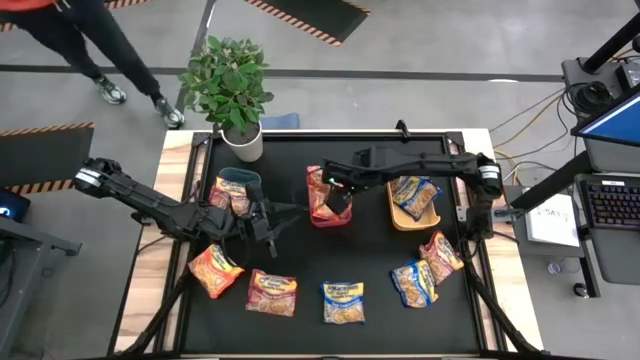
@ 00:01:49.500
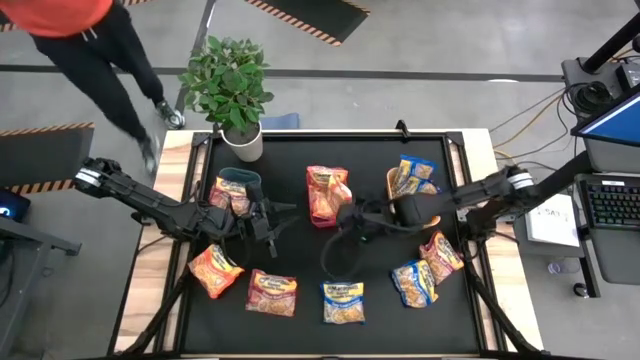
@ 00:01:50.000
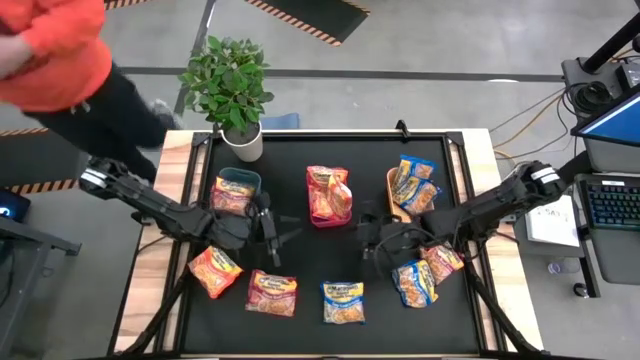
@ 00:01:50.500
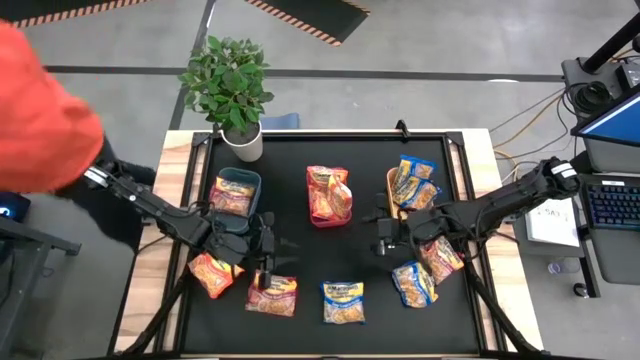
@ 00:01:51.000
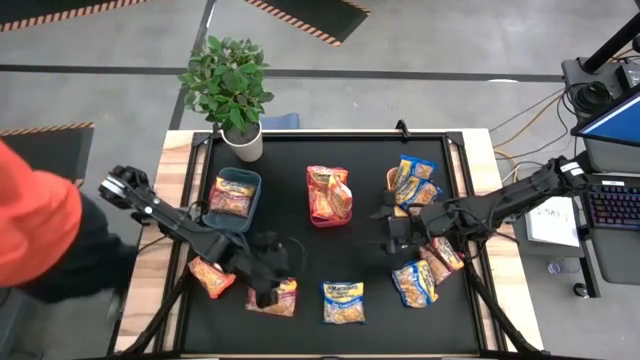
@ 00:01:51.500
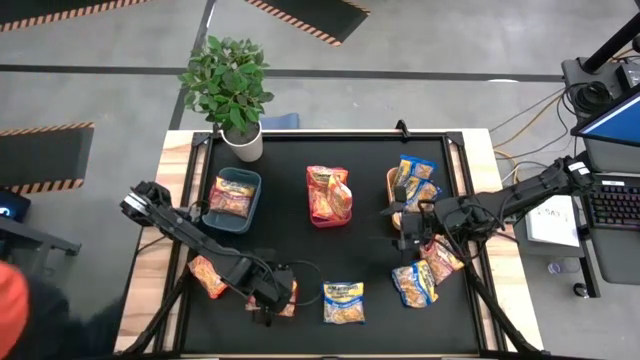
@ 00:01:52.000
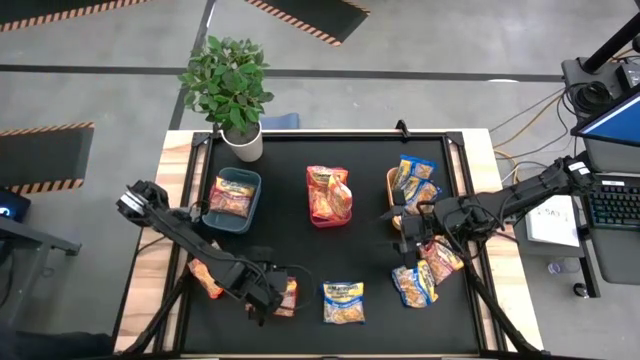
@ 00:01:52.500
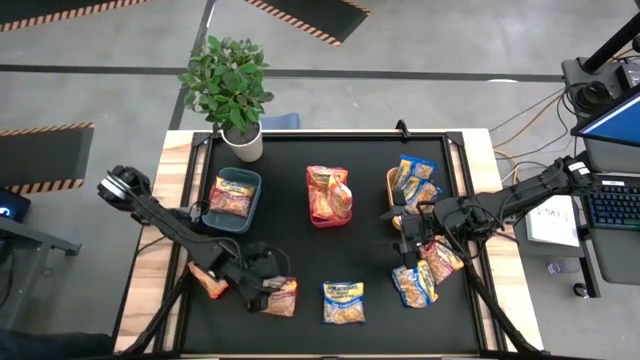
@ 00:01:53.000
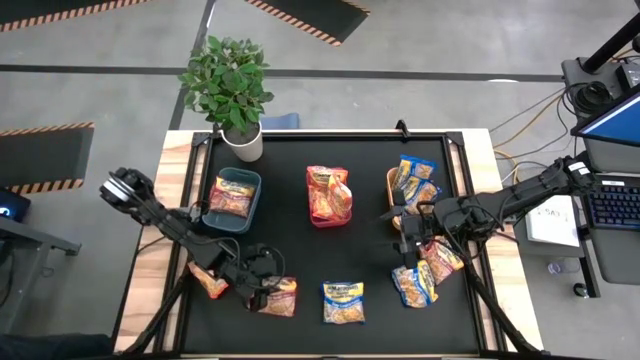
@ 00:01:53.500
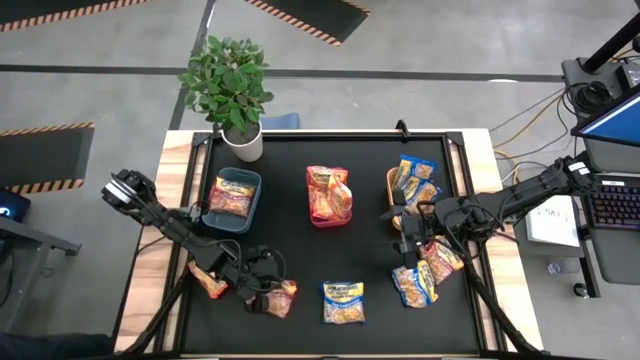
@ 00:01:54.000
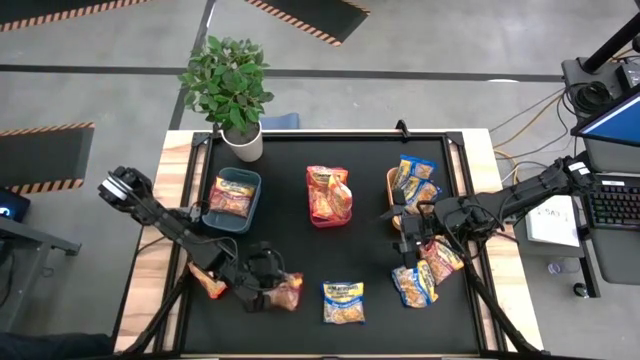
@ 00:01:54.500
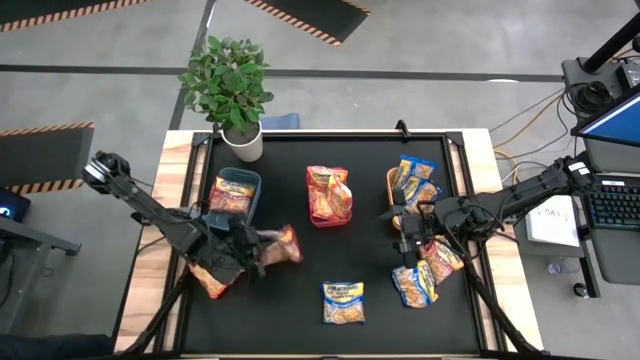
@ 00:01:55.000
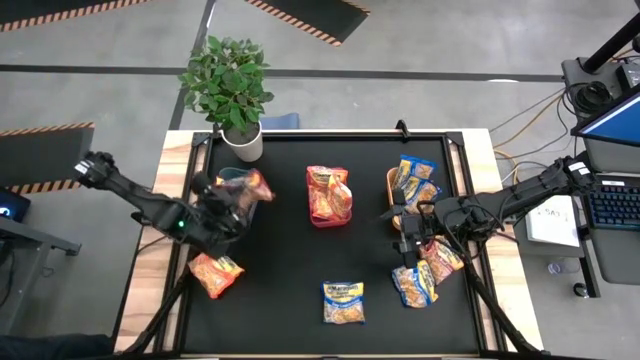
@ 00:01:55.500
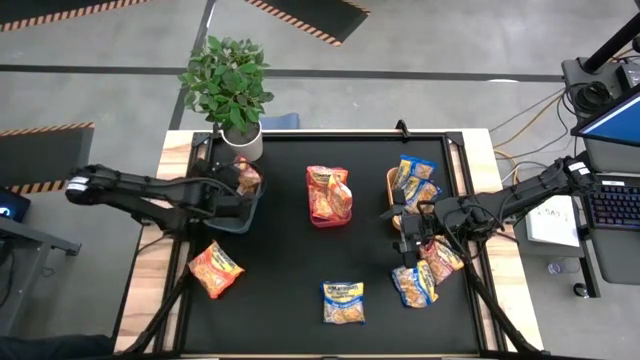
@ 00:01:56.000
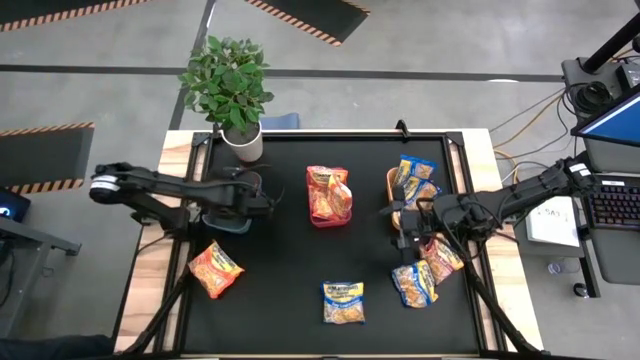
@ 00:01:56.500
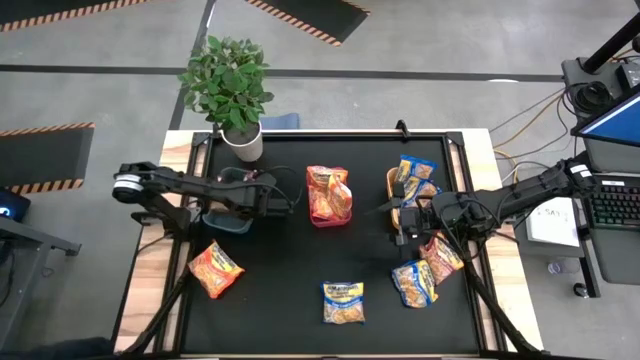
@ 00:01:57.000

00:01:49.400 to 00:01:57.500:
Task: Sort Maruchan noodles
Put the red noodle pack into the blue bin

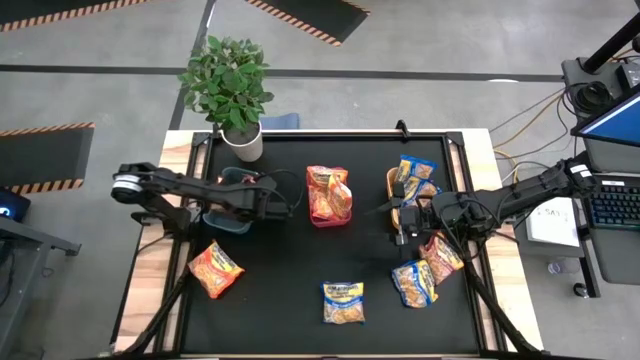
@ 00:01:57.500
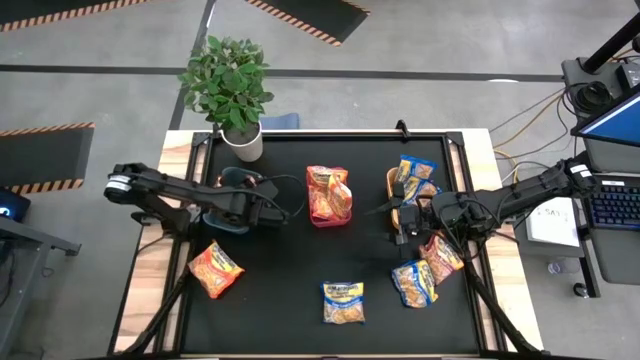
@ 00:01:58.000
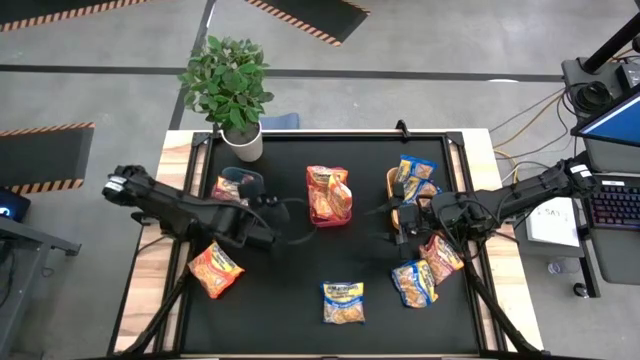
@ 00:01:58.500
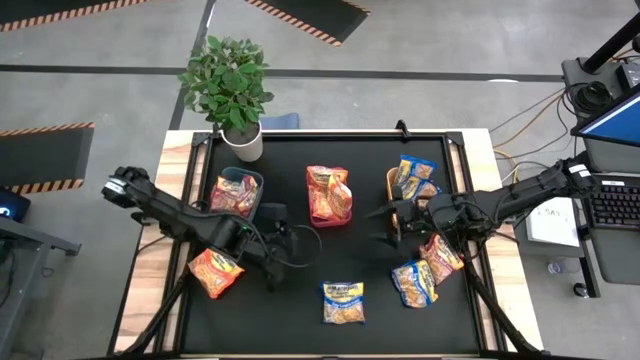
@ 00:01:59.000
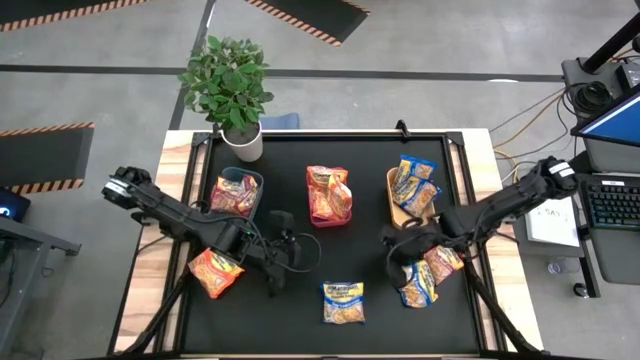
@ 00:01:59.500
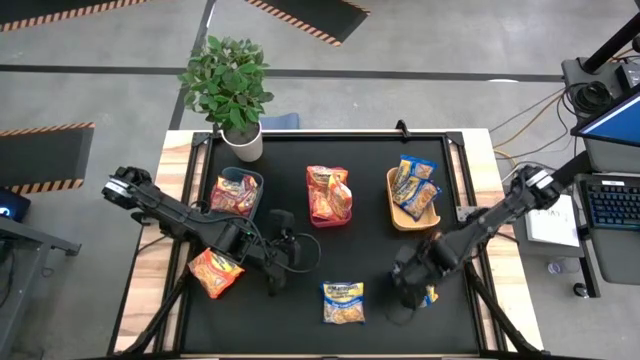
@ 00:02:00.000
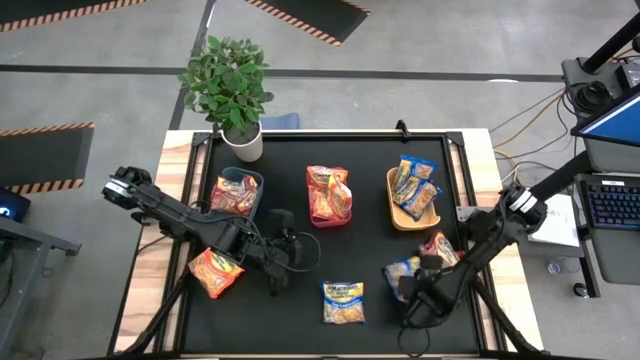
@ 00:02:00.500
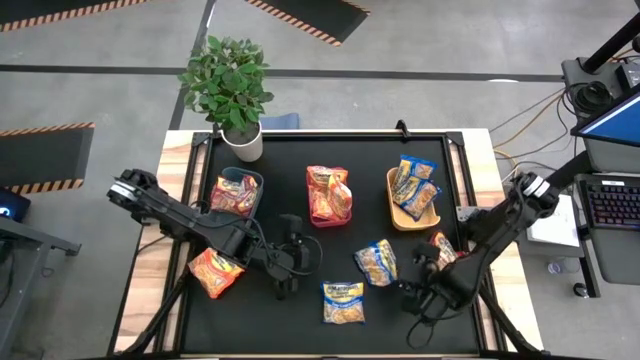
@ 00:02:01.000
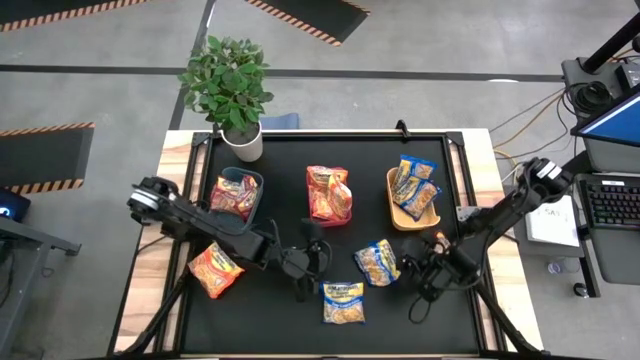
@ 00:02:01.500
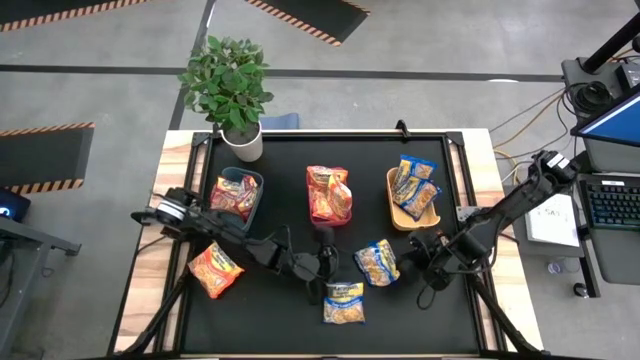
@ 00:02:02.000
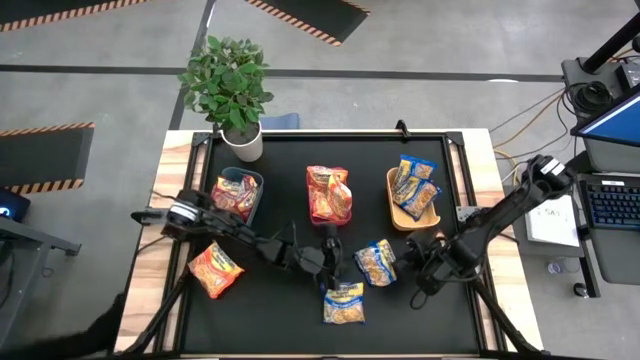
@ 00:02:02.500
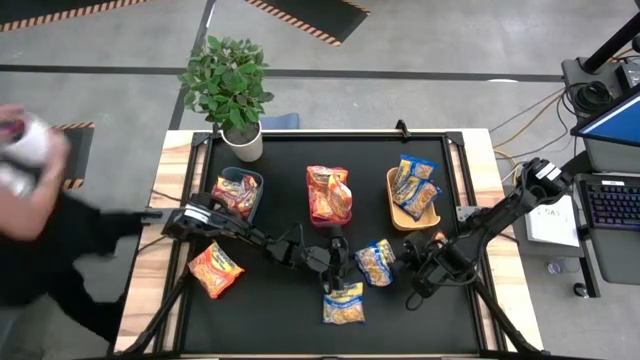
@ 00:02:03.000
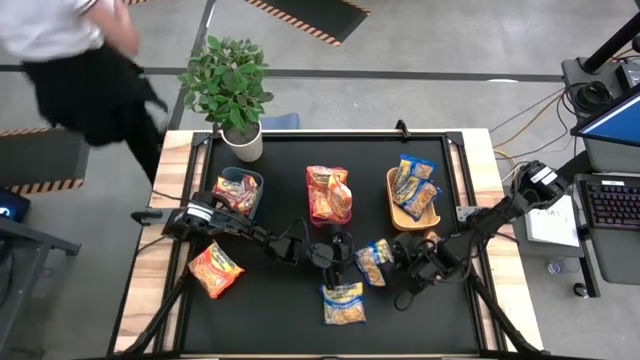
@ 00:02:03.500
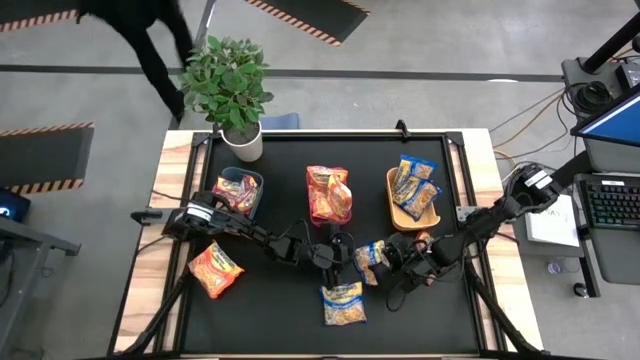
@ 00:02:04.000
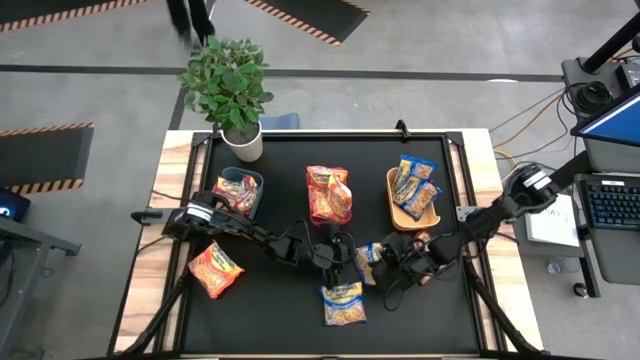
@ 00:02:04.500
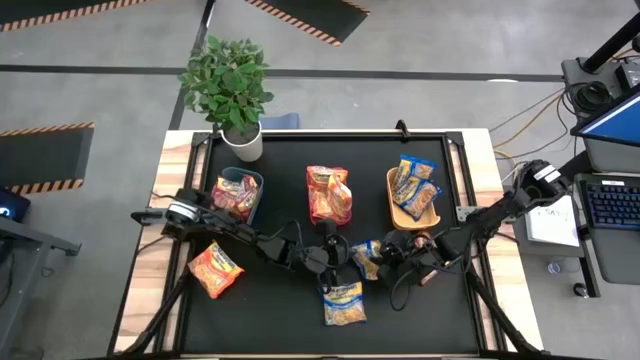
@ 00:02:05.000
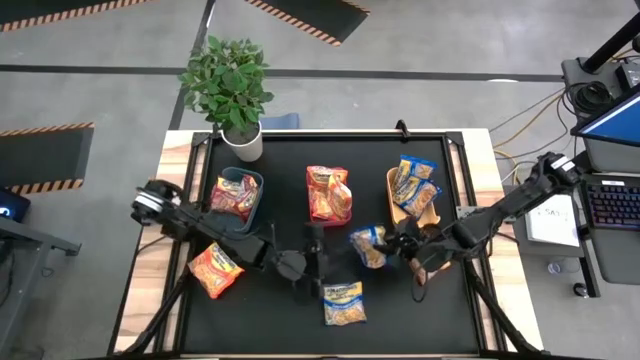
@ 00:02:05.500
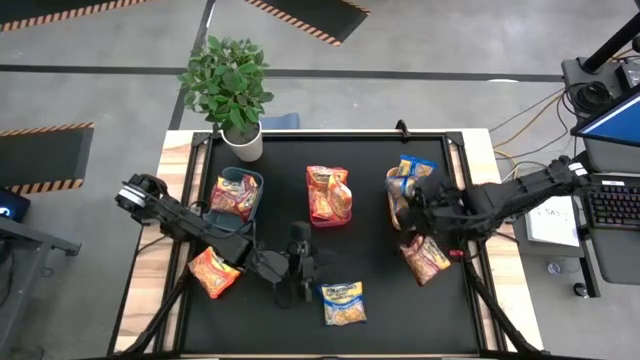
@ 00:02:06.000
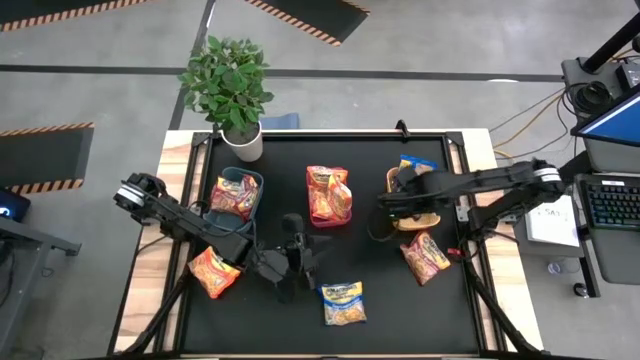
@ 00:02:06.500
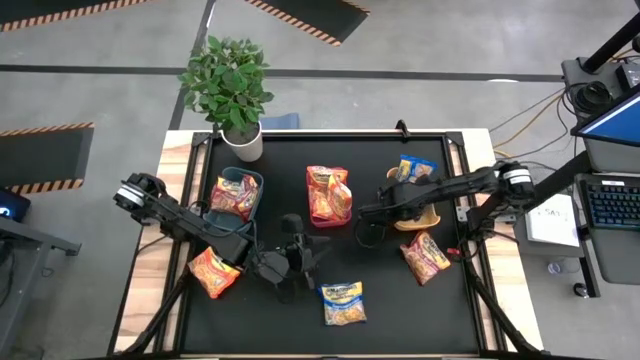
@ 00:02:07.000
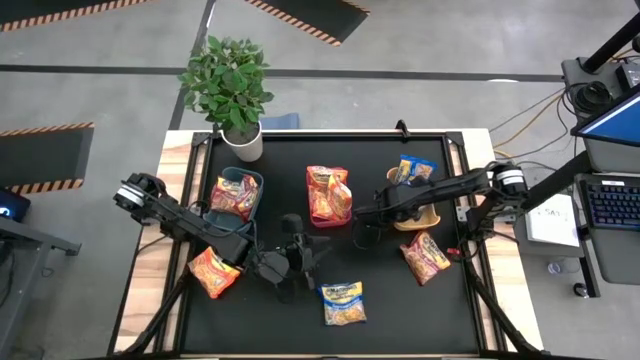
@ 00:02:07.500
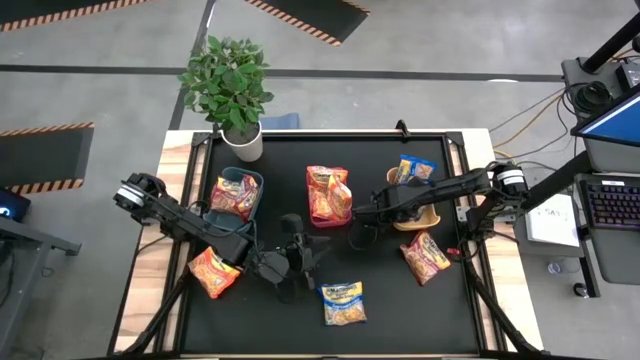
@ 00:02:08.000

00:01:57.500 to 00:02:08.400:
Put the blue noodle pack into the yellow bin

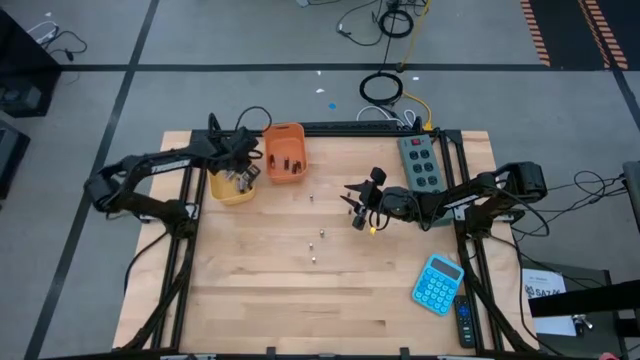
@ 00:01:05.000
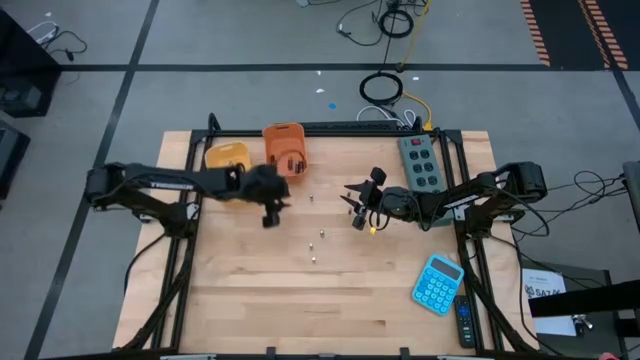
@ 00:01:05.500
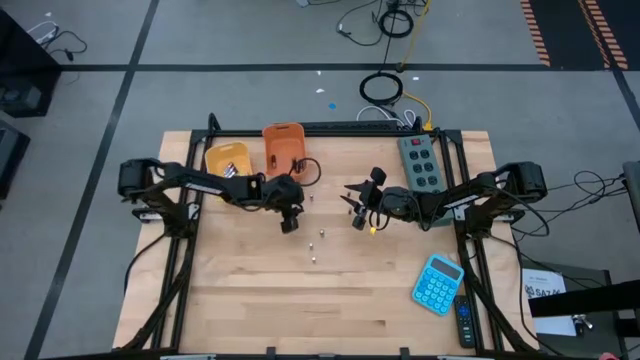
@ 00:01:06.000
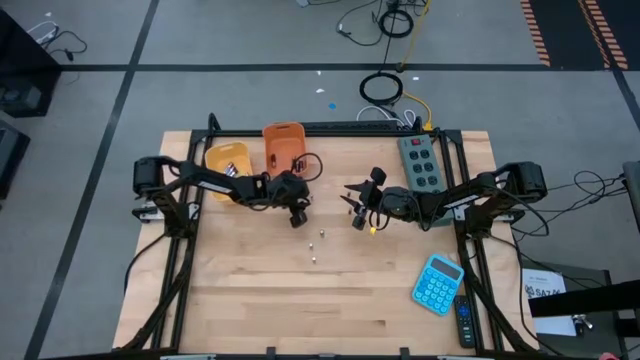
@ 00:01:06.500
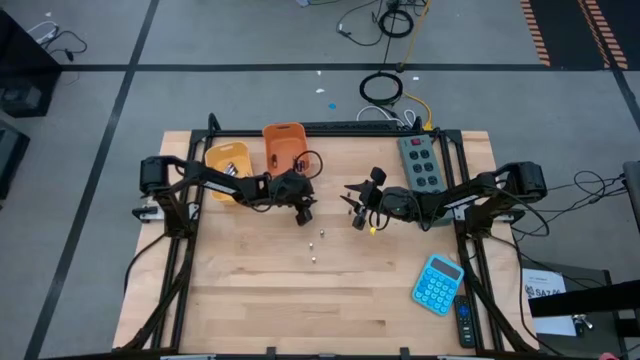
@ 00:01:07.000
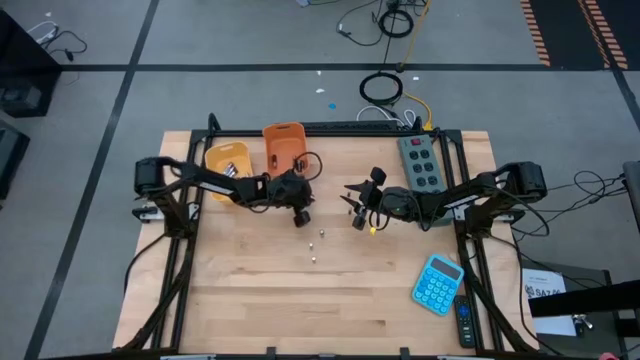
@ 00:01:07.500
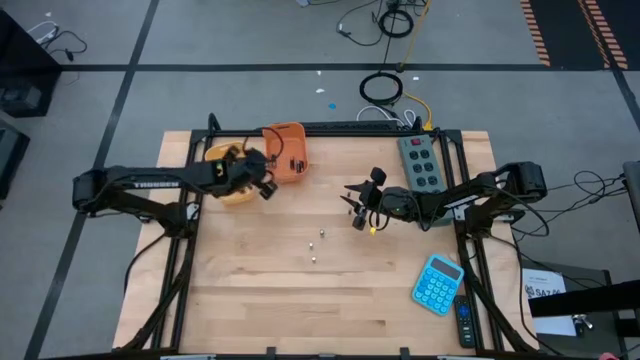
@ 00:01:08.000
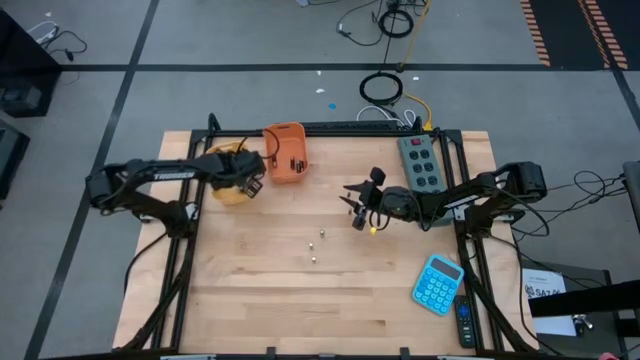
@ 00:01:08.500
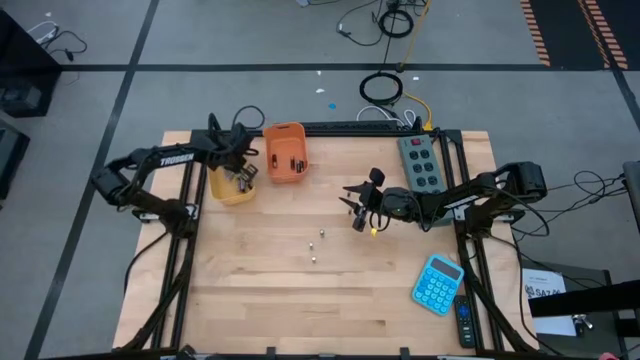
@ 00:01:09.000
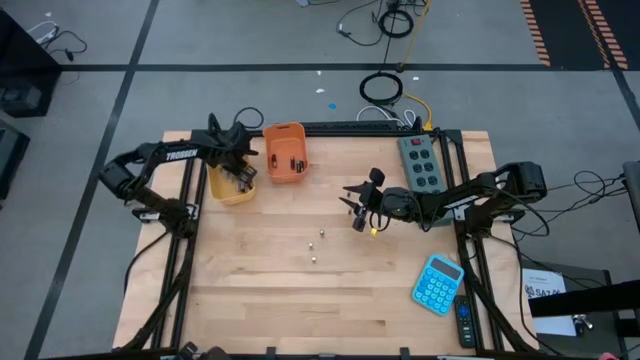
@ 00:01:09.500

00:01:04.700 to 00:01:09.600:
Task: Sort batteries
Put the silver battery into the yellow bin
